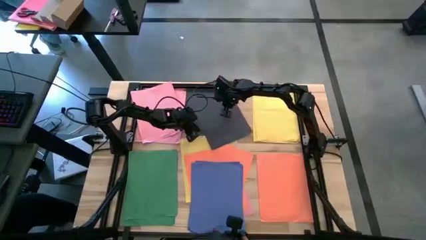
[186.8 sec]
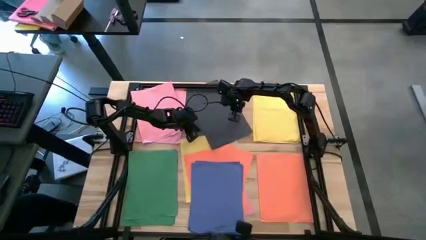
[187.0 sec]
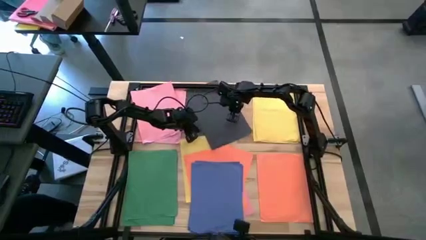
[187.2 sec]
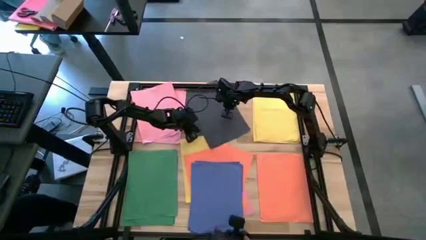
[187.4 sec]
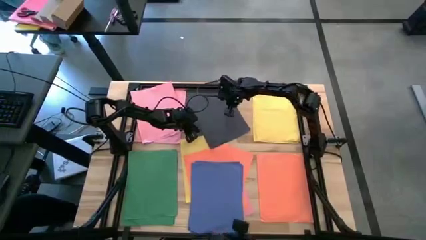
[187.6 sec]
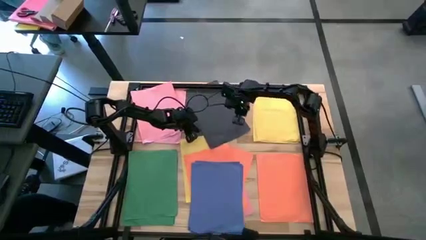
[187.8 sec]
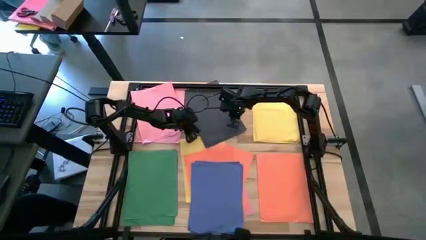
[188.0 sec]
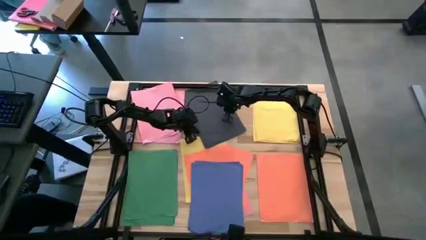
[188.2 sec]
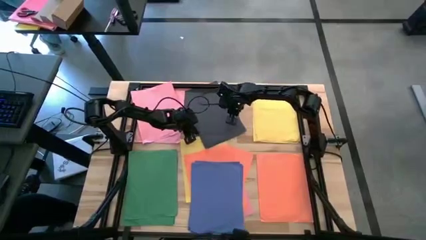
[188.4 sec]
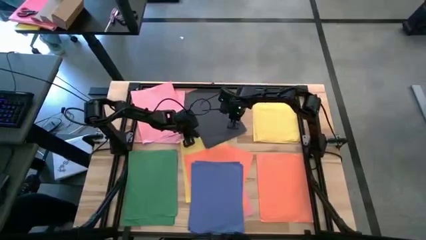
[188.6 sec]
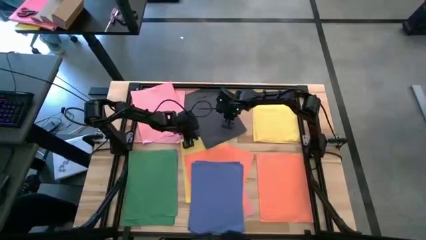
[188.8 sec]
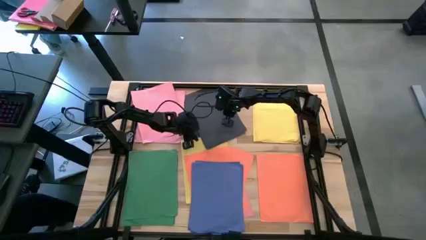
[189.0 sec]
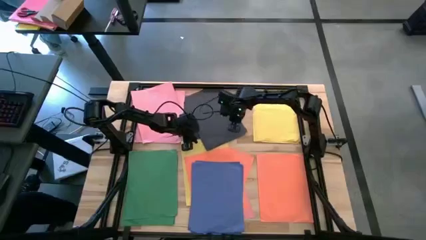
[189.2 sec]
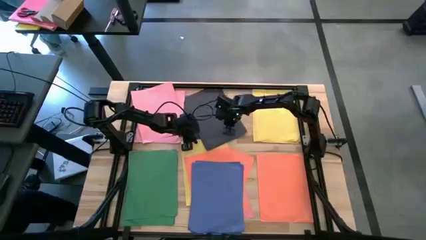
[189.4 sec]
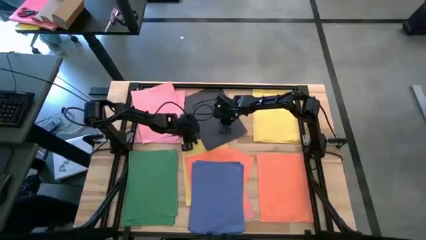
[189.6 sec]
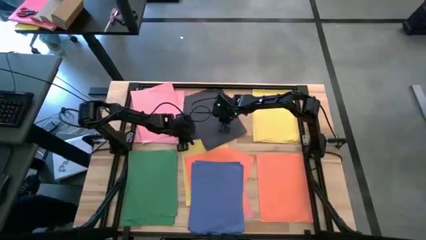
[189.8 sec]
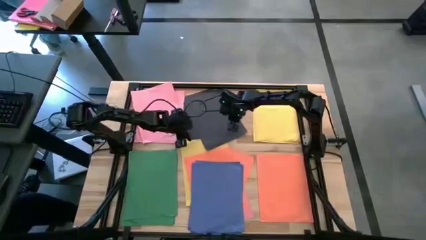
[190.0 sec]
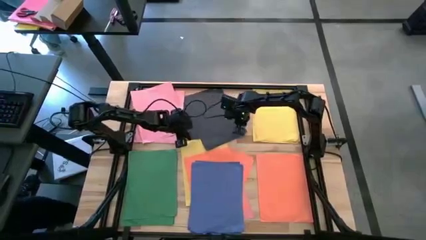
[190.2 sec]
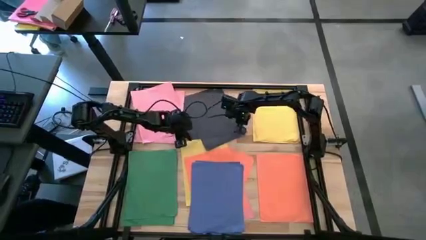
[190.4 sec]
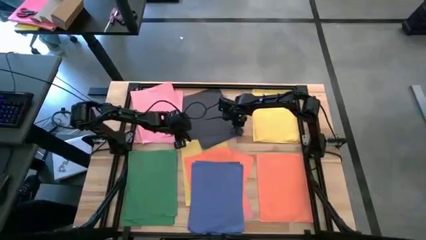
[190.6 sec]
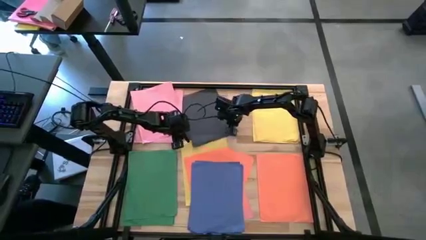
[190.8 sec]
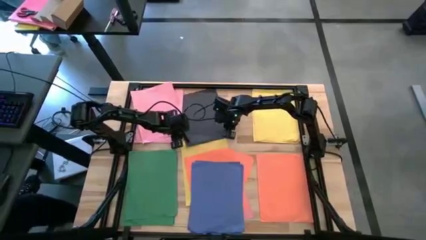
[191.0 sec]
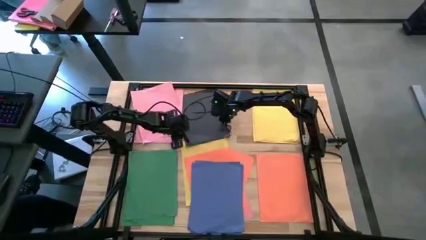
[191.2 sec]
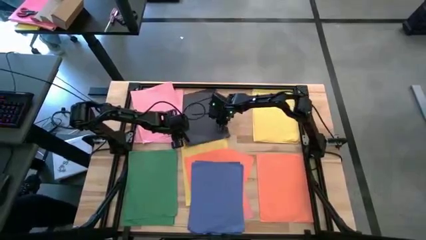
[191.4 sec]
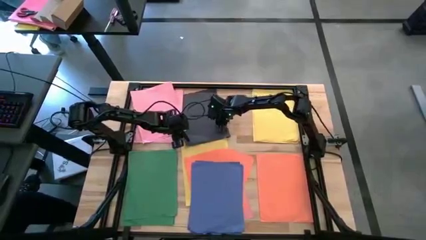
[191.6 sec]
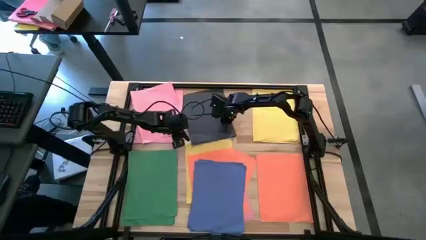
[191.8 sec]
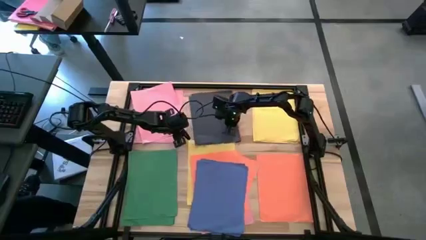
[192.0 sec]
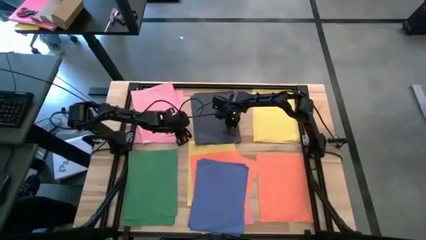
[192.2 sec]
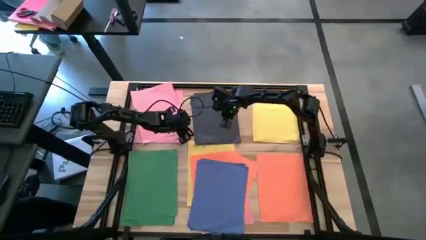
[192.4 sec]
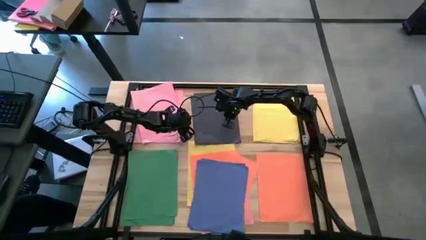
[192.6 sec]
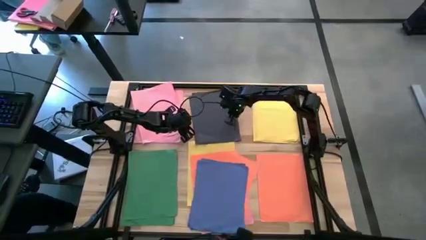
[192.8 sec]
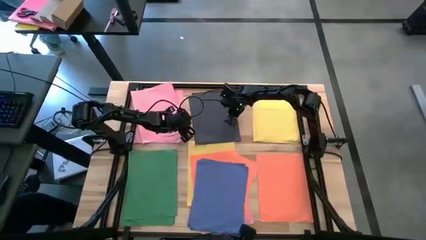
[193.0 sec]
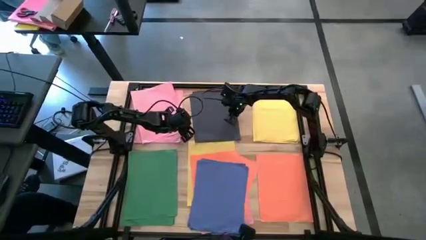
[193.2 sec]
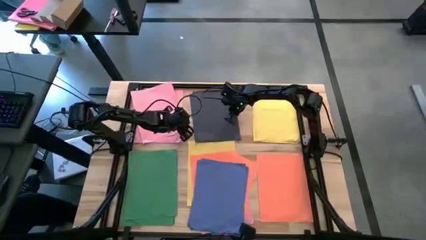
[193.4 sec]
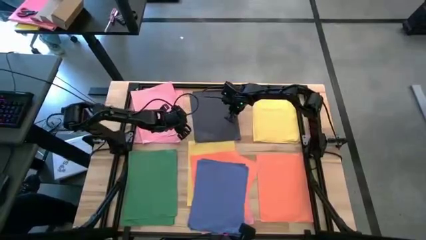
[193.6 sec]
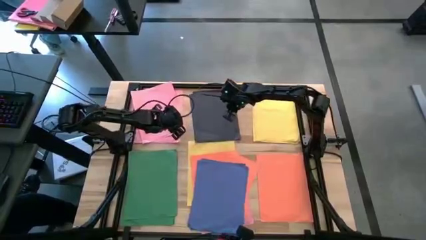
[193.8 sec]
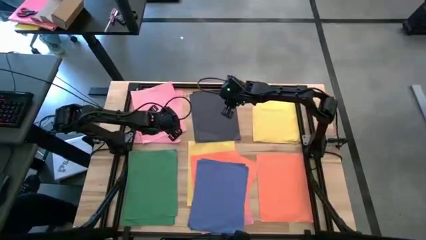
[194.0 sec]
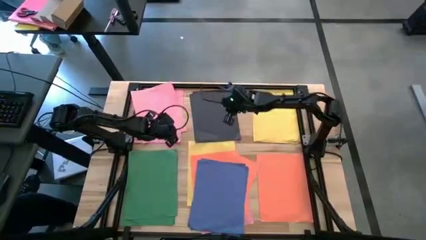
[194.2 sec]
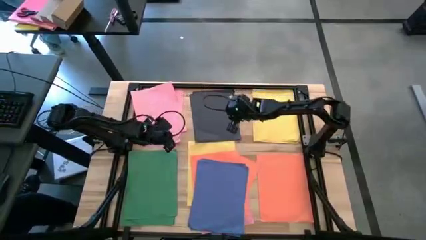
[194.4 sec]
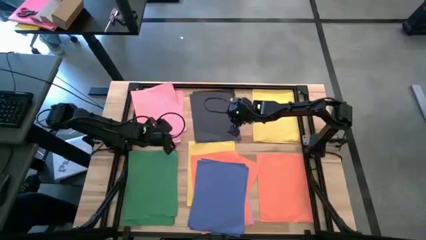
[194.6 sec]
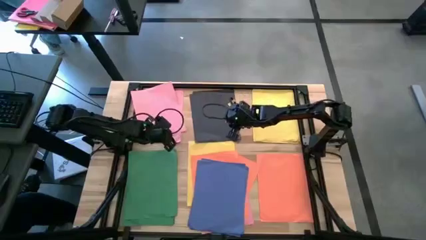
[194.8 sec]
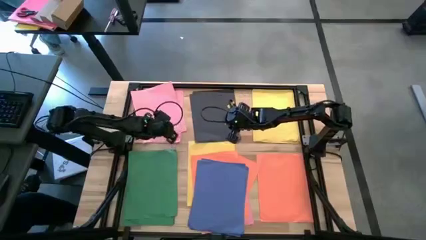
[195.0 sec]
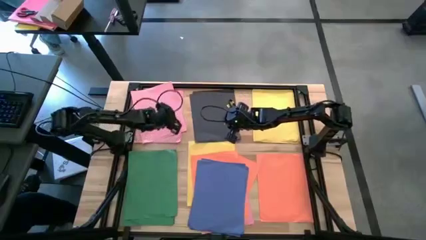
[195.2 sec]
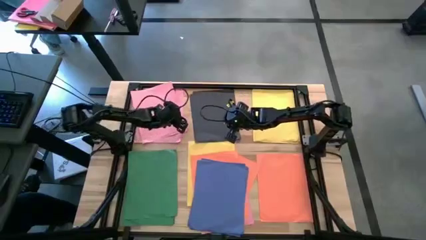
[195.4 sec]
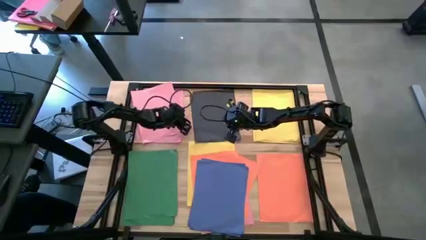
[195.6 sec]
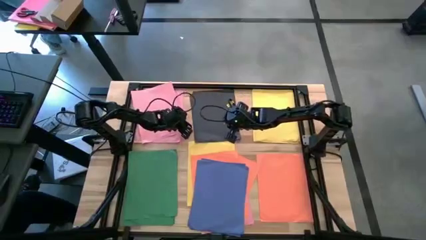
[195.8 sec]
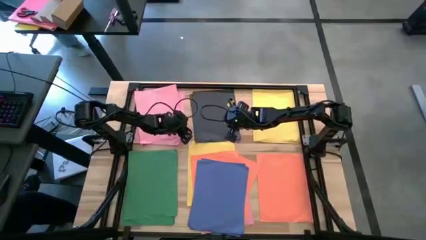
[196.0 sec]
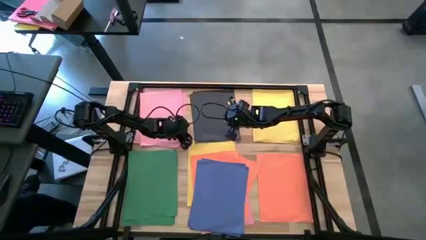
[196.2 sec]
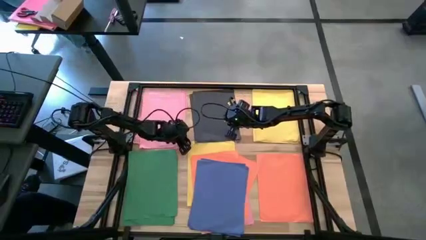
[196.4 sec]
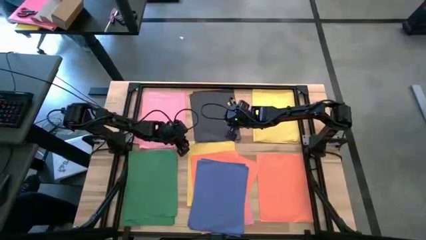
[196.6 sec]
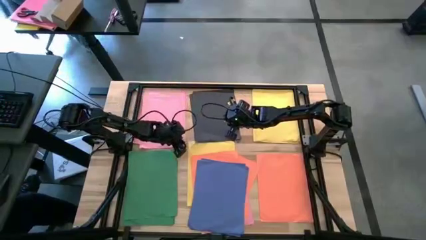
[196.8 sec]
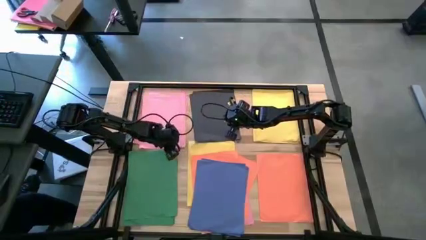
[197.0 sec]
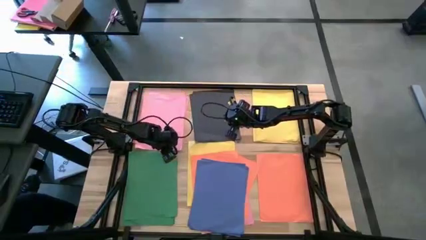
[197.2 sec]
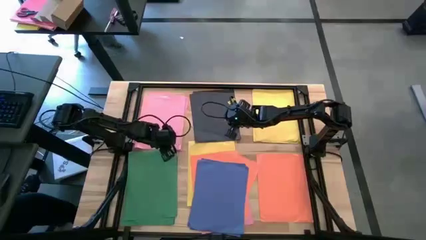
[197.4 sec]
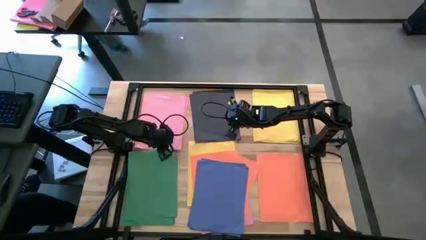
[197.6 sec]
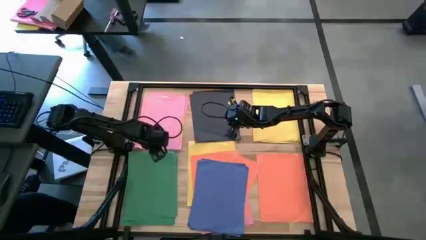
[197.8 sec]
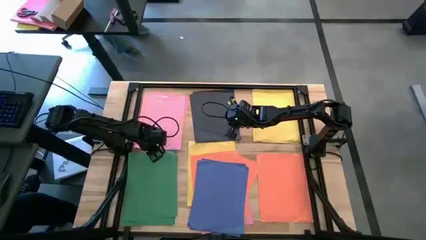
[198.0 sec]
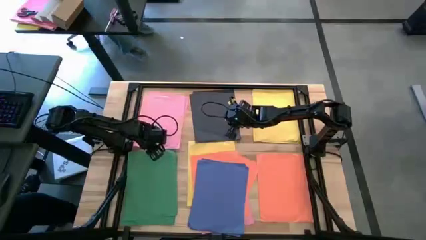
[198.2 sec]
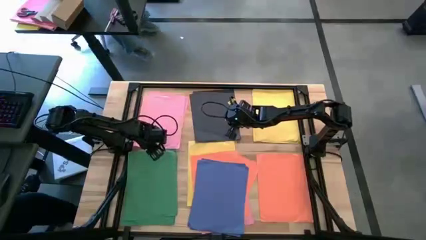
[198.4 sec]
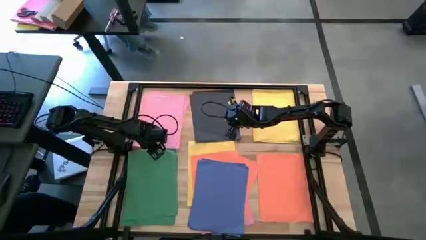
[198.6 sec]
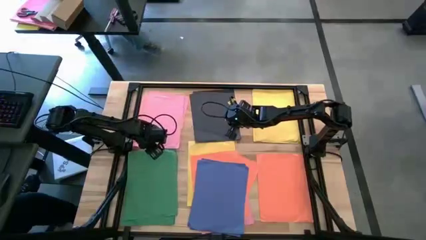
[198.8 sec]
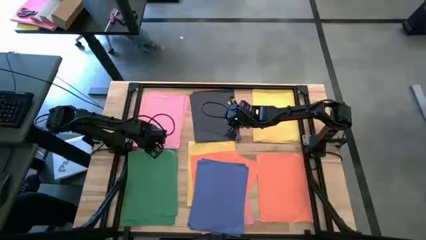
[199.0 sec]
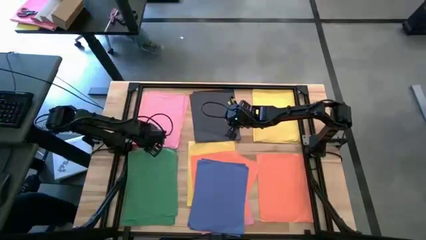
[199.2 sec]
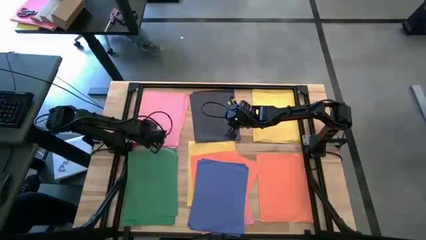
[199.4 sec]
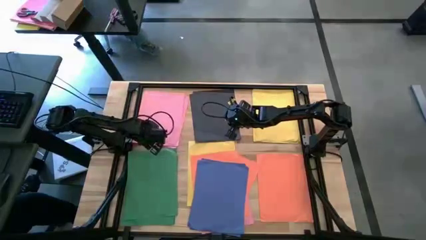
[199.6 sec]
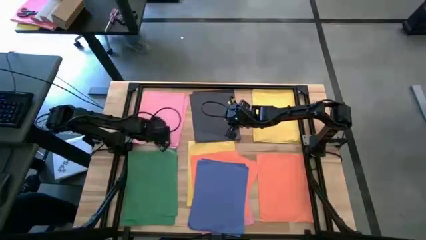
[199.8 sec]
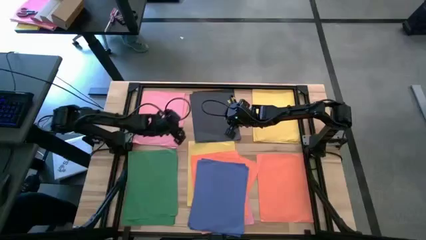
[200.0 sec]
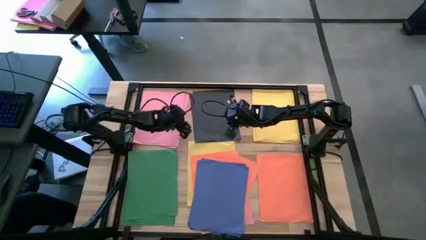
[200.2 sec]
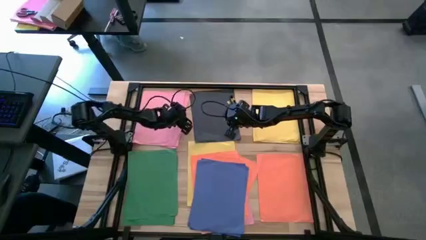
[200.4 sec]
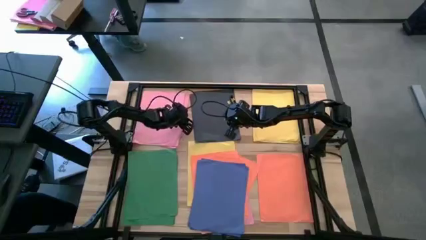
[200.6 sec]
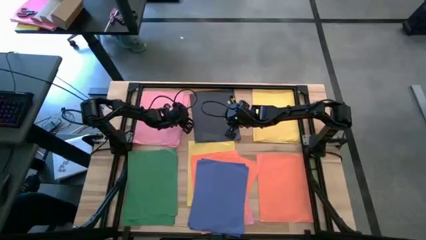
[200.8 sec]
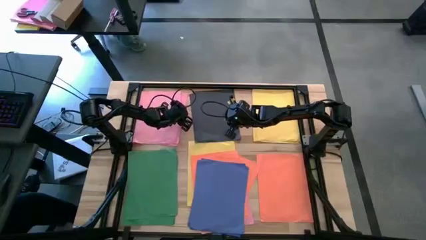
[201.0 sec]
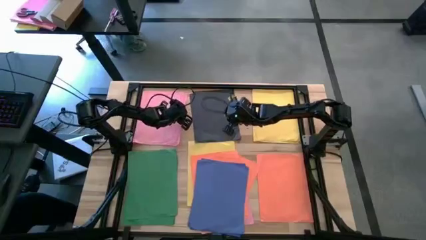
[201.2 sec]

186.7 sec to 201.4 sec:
Task: Organize paper
Adjust the stacked colored papers
